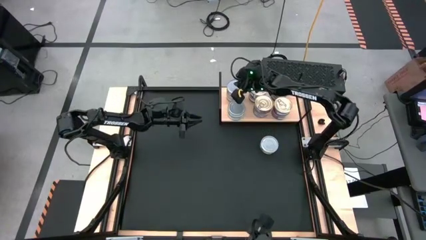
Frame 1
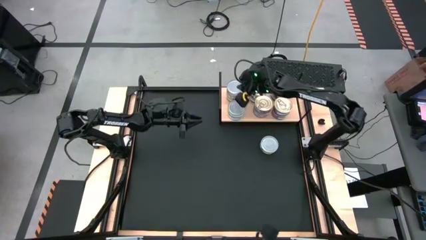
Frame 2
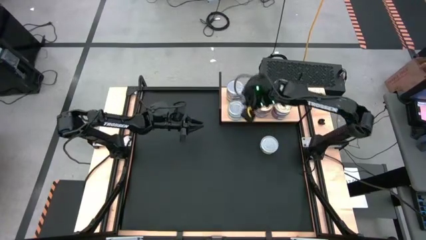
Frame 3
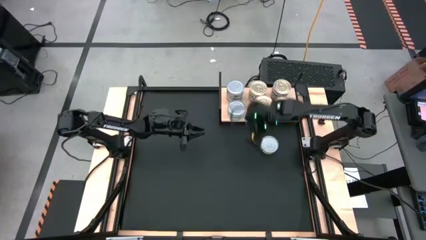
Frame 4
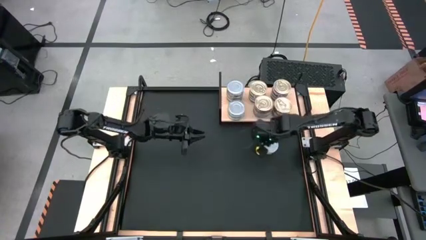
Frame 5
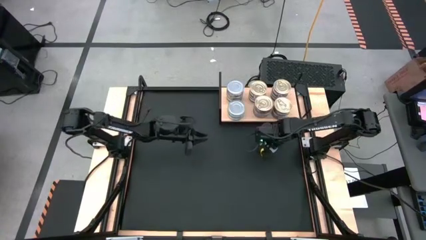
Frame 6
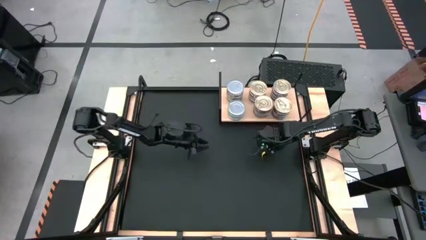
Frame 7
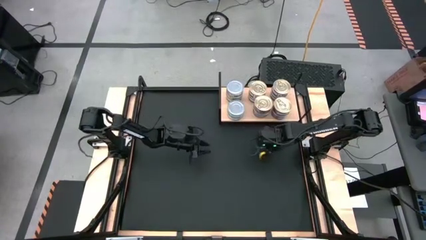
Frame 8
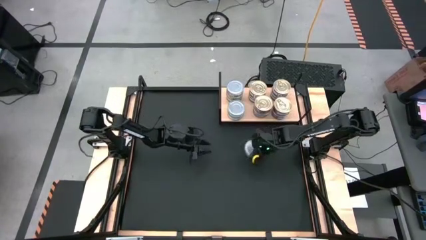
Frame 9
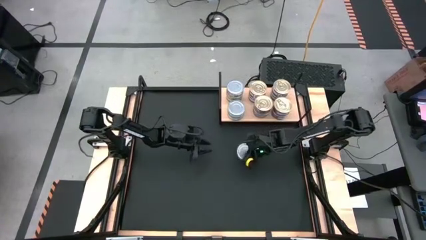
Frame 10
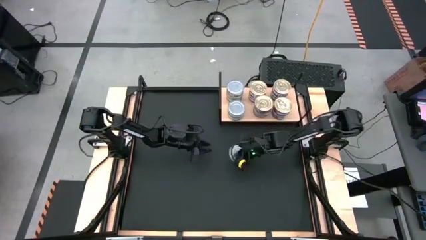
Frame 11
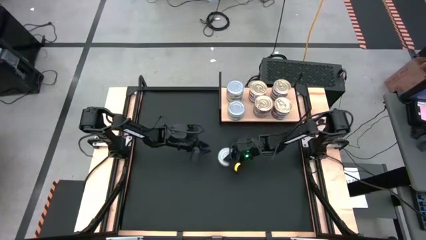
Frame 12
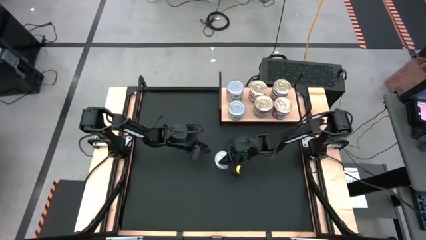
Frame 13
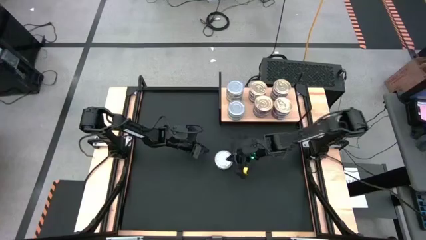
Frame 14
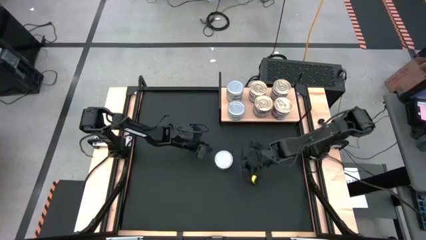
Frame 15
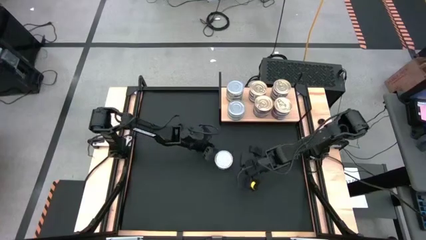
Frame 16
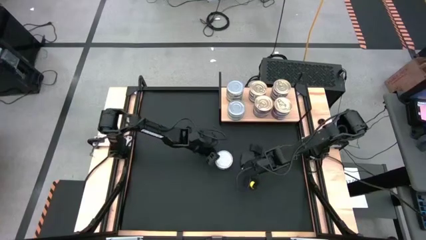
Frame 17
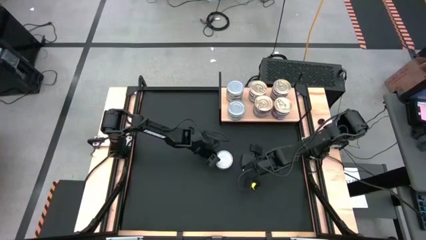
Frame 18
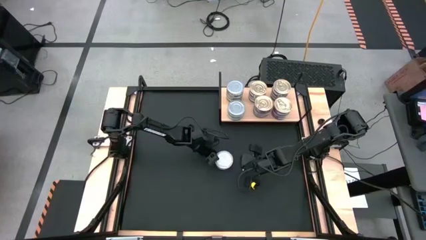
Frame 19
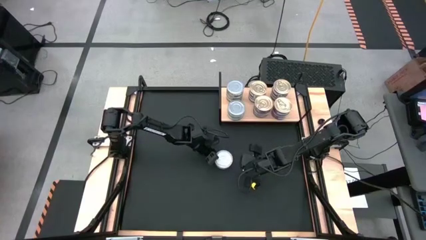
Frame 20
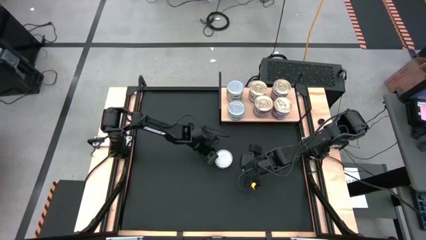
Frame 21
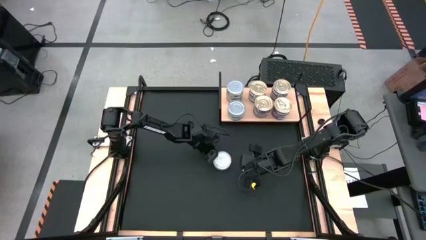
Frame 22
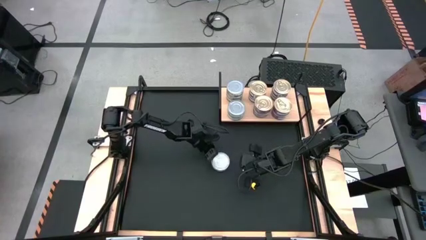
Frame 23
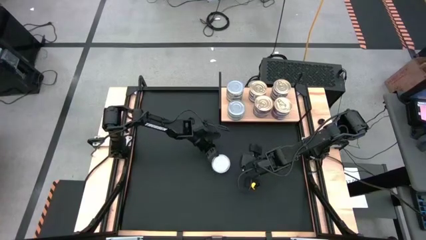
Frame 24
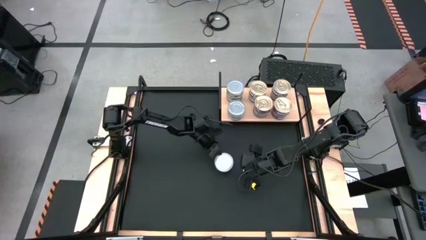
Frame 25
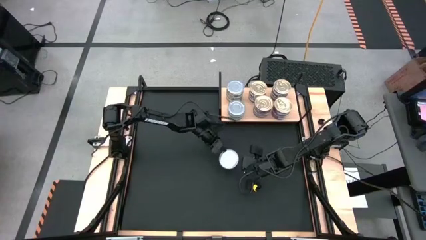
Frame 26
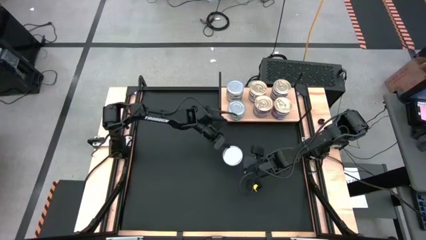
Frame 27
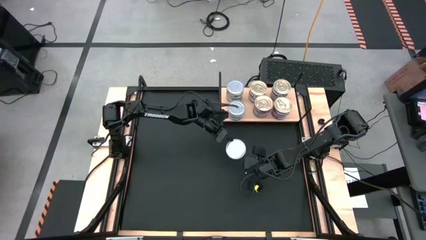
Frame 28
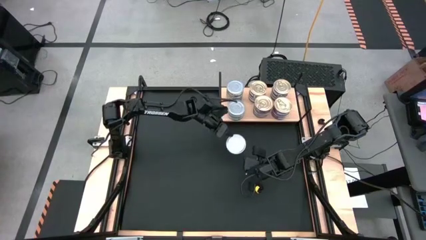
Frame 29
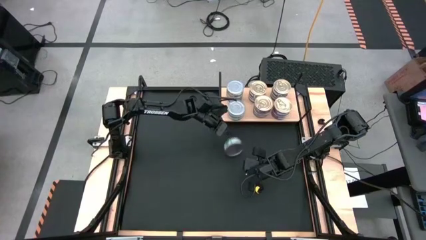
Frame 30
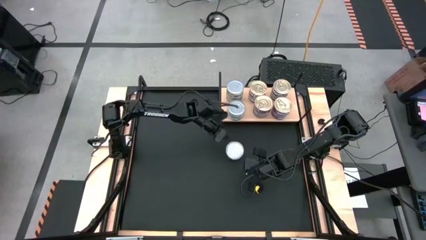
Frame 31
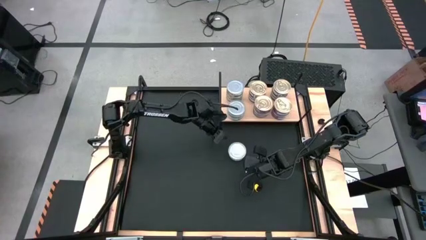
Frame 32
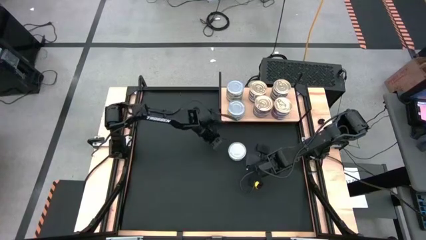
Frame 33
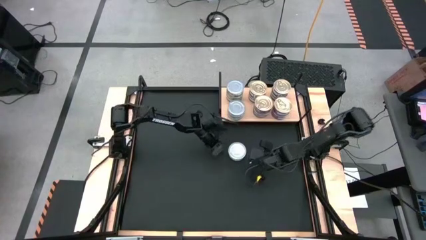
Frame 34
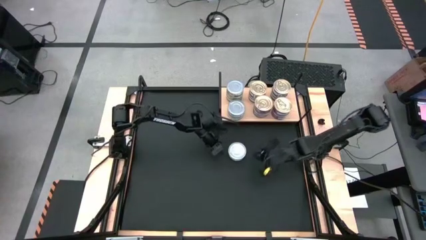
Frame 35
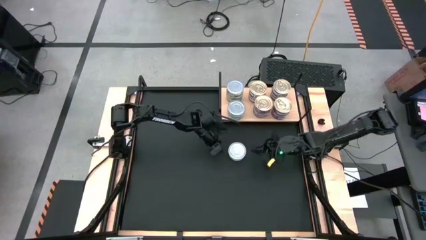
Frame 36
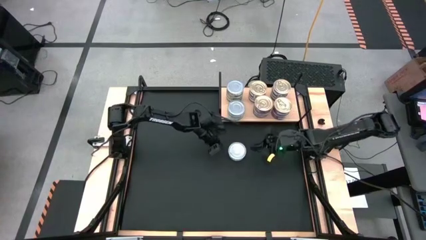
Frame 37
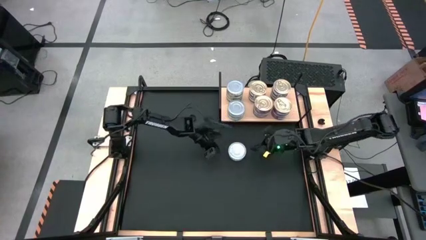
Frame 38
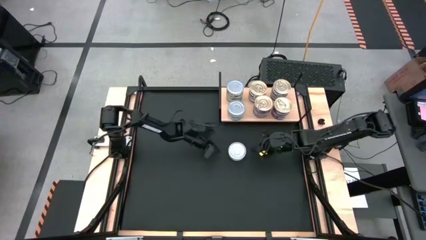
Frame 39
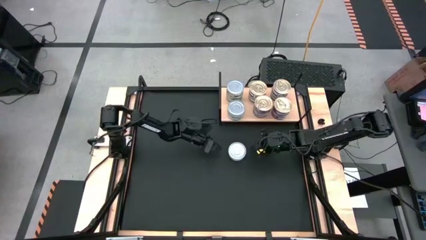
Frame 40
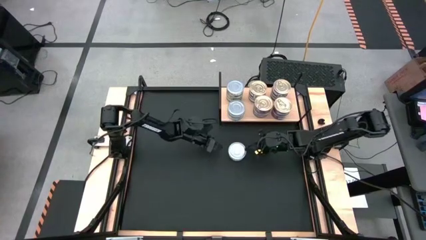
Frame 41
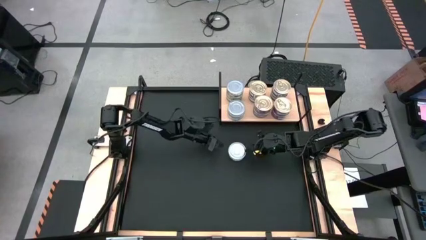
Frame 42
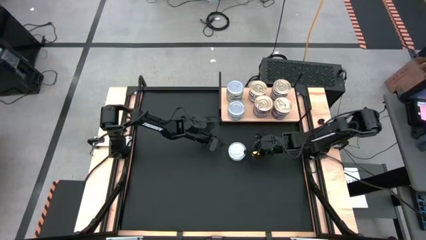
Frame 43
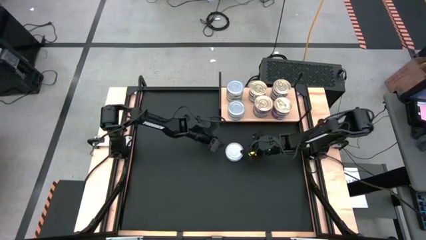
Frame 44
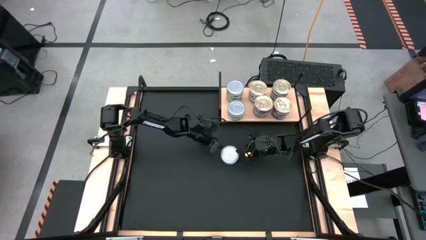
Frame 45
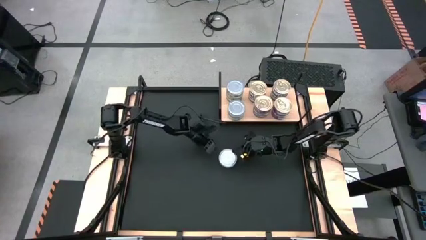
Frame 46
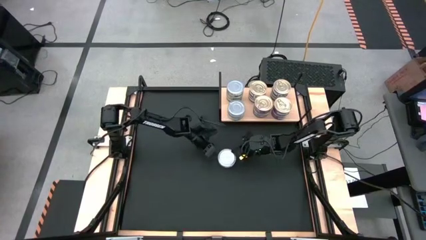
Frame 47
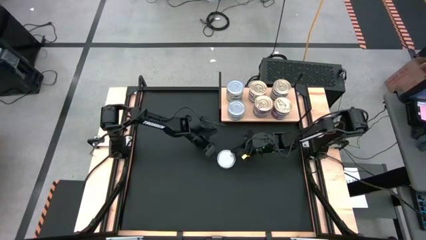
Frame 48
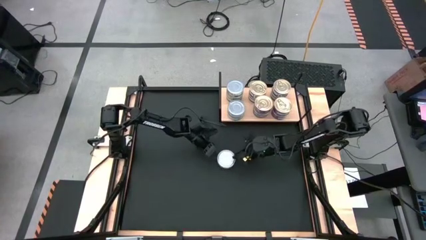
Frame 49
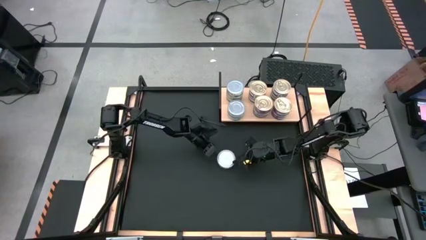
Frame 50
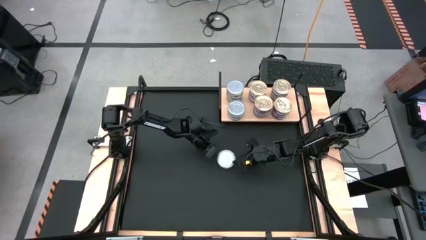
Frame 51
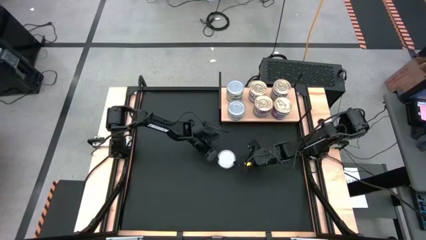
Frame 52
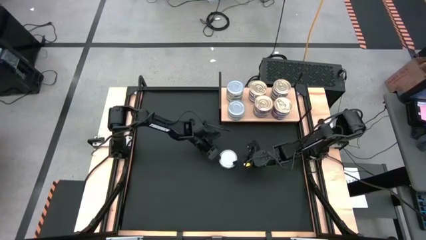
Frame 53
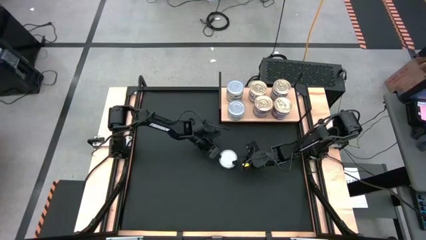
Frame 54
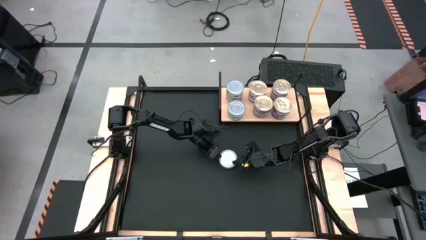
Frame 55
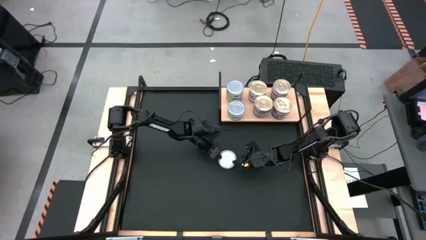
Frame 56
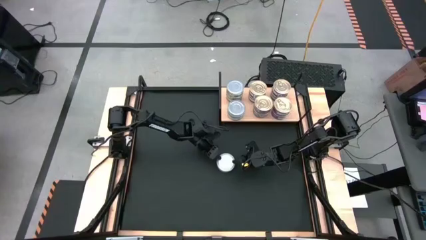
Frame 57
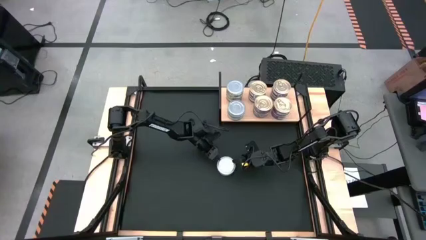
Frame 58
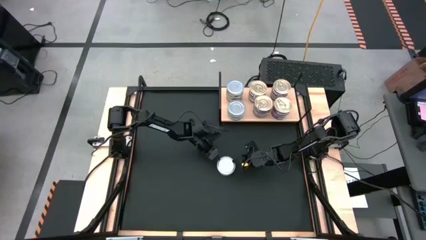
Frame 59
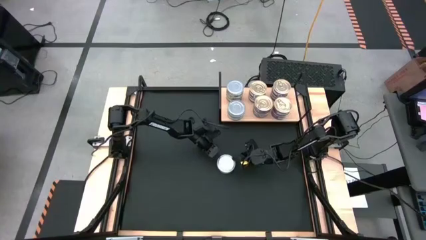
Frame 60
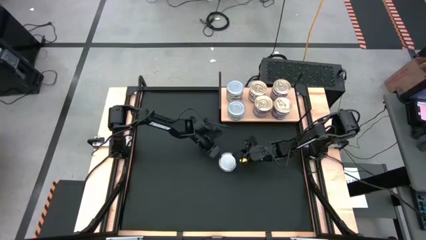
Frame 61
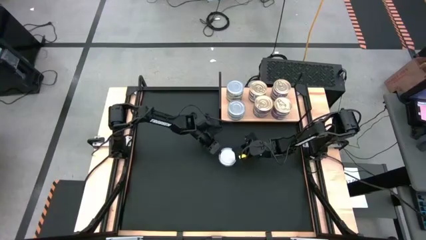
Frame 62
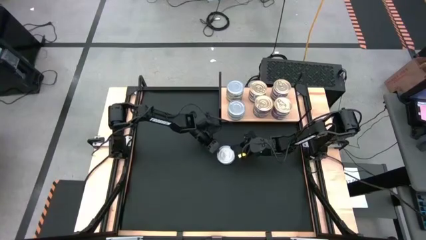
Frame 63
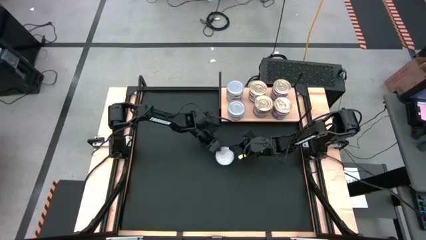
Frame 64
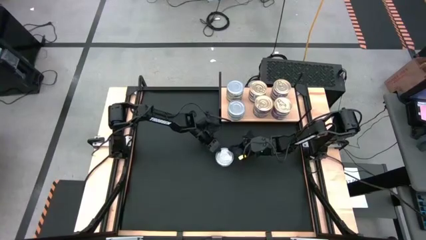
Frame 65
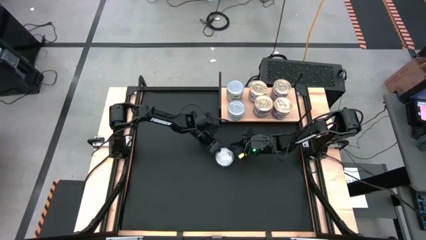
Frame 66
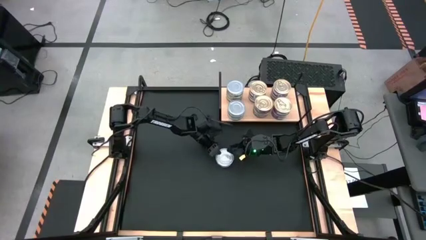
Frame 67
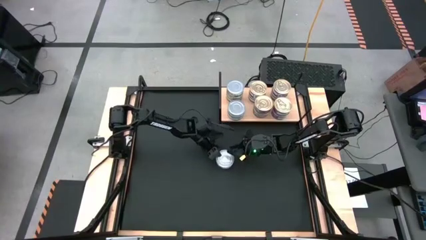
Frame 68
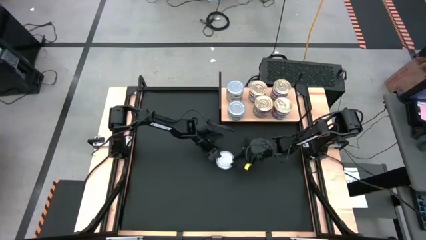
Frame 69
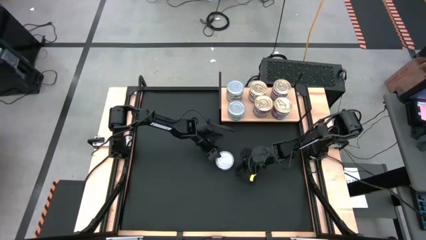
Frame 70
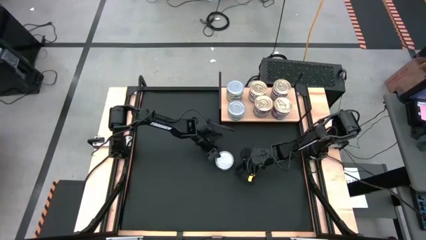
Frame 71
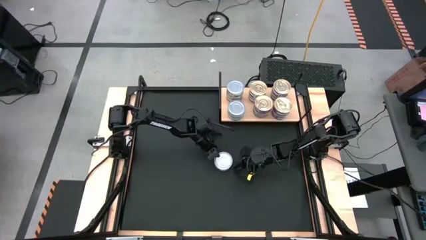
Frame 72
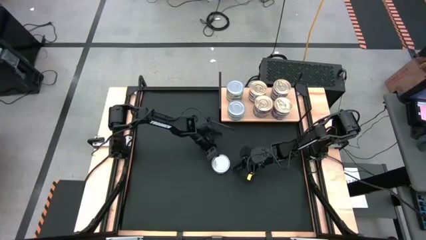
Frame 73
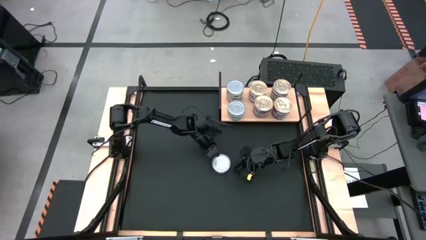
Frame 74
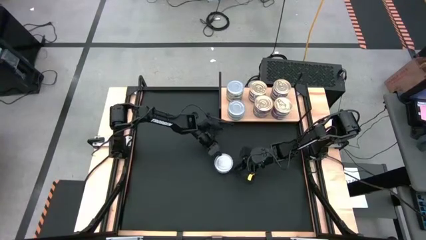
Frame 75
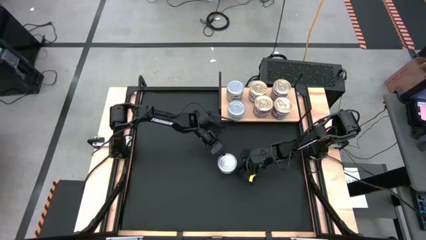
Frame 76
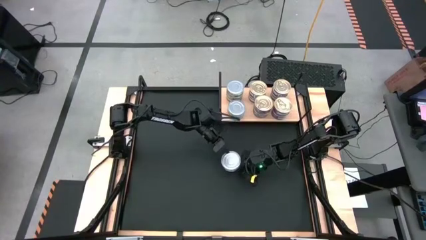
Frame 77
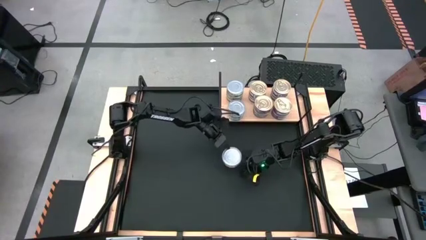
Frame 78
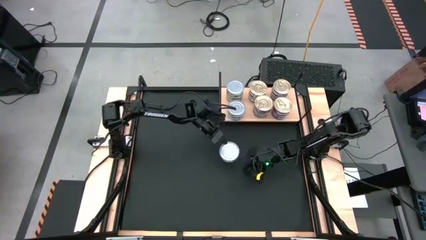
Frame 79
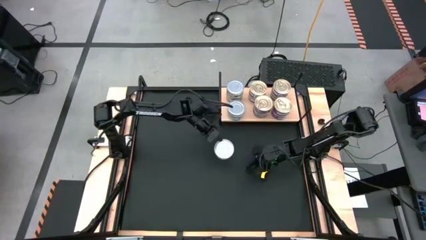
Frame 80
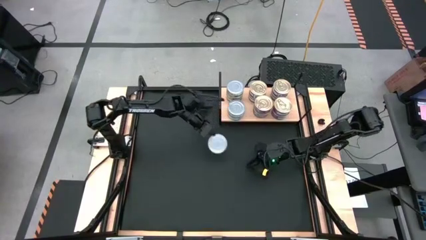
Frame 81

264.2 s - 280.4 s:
Task: Stack canned seafood by type on shelf
Stack the green tuna can on top of the other green tuna can on the shelf
